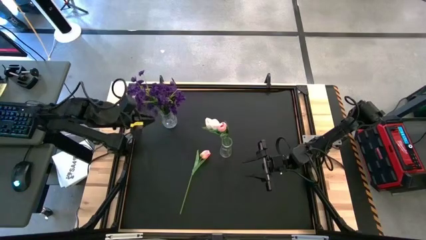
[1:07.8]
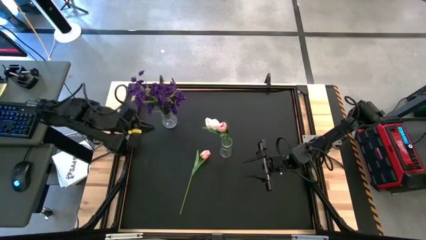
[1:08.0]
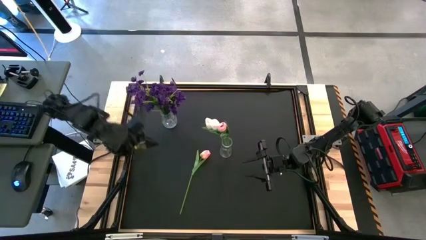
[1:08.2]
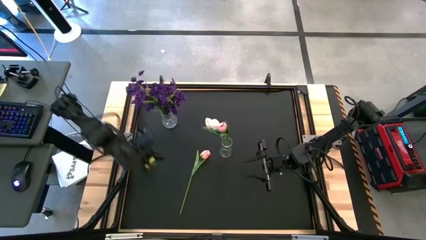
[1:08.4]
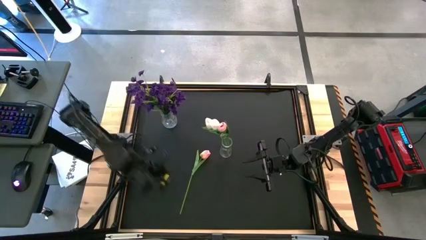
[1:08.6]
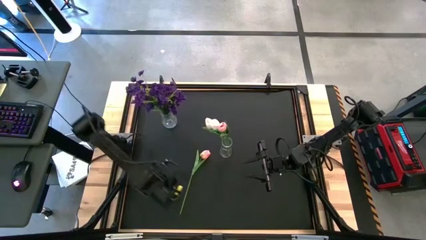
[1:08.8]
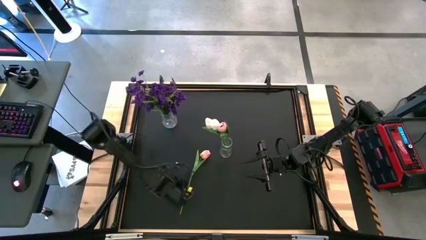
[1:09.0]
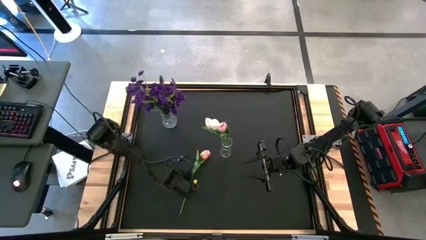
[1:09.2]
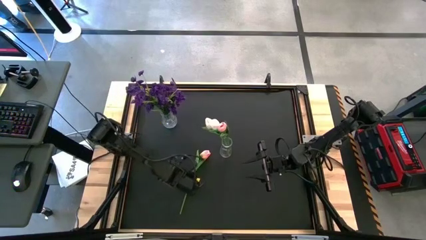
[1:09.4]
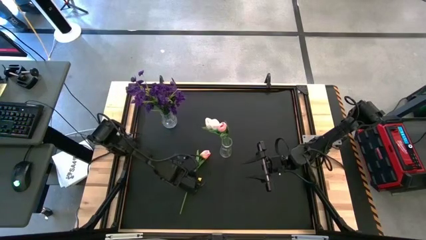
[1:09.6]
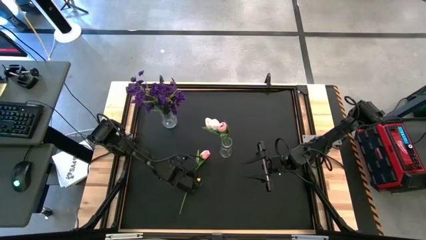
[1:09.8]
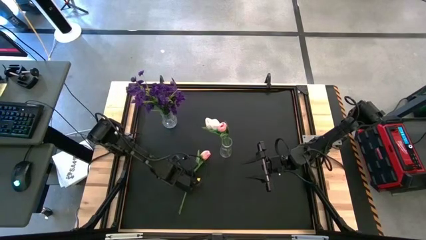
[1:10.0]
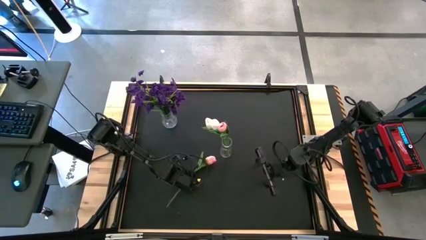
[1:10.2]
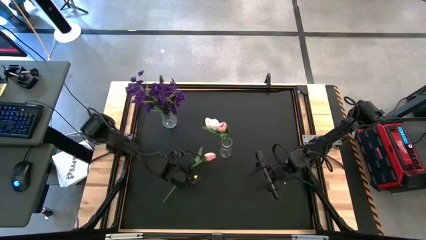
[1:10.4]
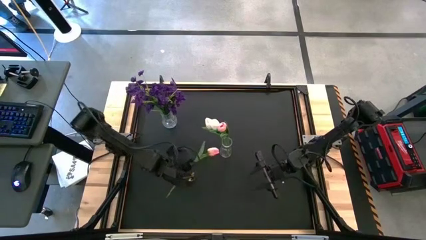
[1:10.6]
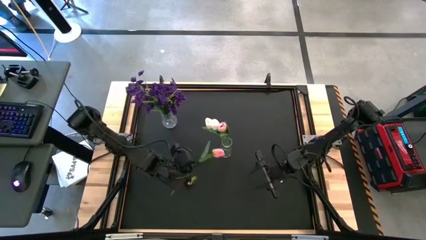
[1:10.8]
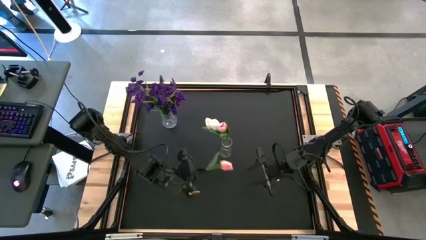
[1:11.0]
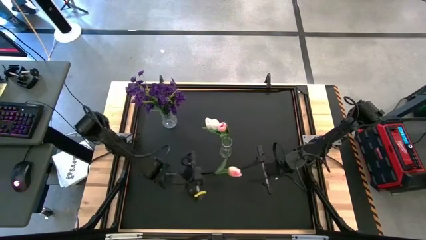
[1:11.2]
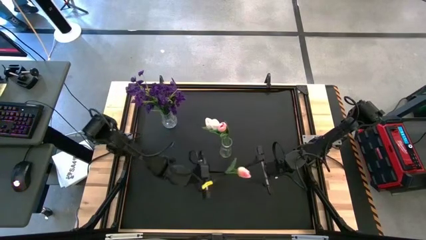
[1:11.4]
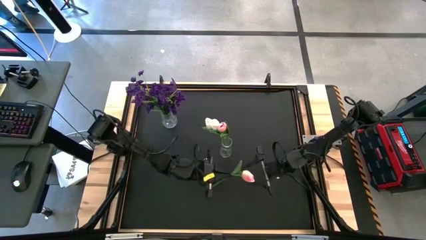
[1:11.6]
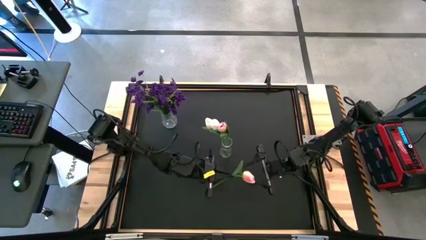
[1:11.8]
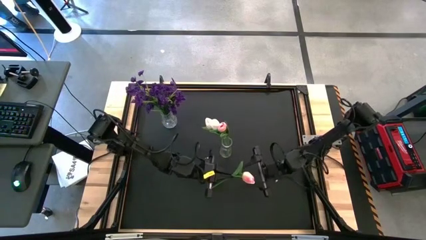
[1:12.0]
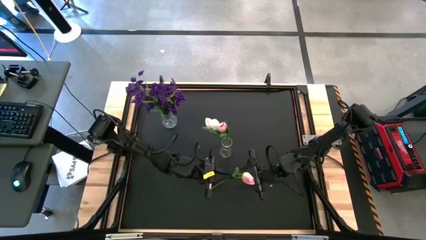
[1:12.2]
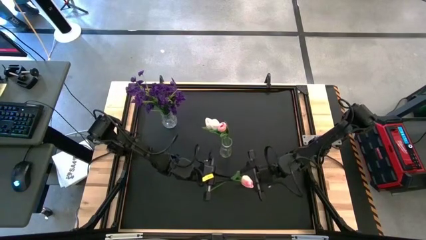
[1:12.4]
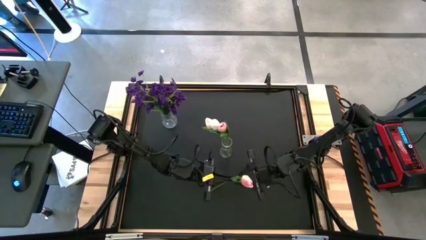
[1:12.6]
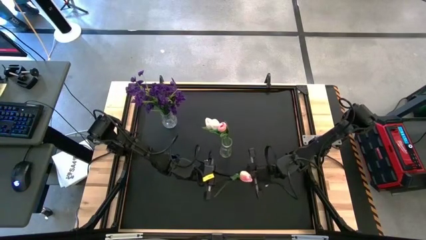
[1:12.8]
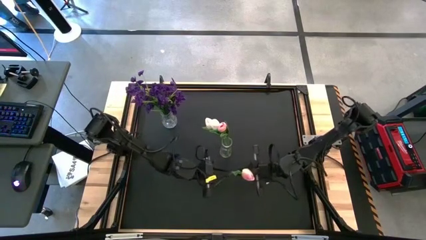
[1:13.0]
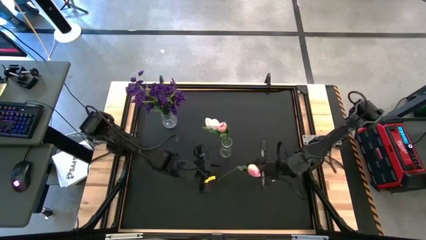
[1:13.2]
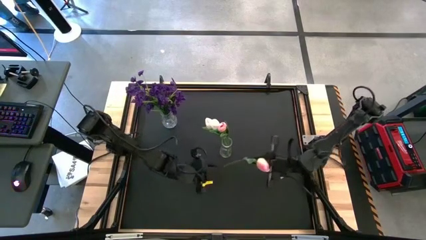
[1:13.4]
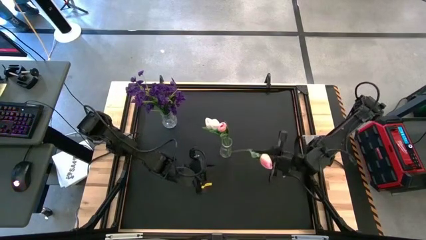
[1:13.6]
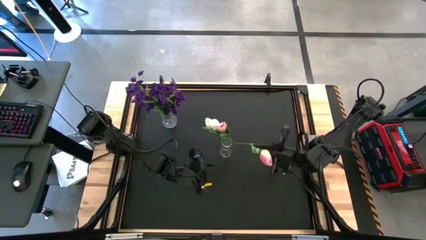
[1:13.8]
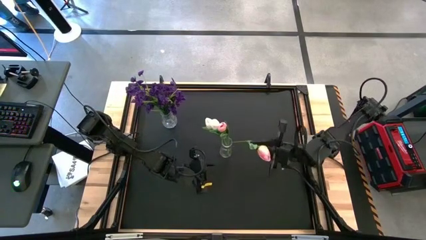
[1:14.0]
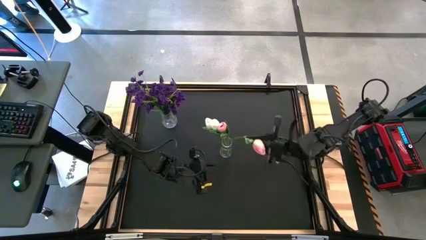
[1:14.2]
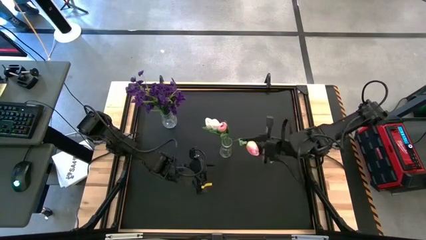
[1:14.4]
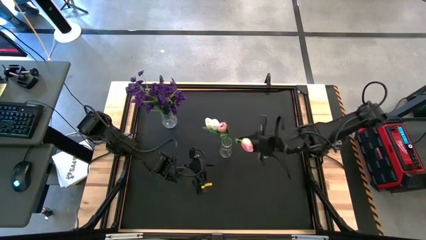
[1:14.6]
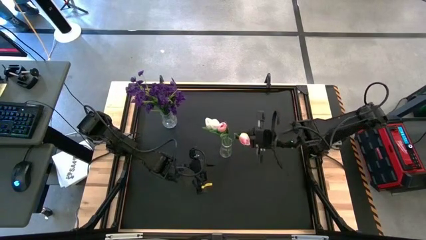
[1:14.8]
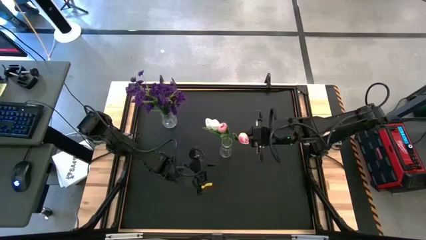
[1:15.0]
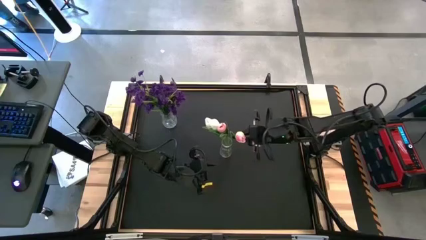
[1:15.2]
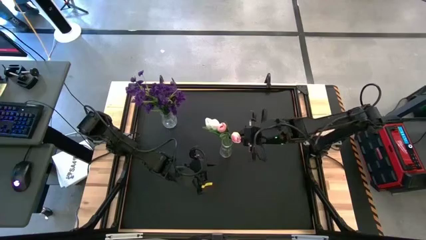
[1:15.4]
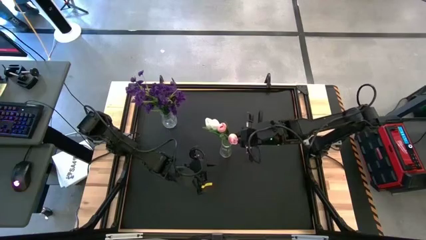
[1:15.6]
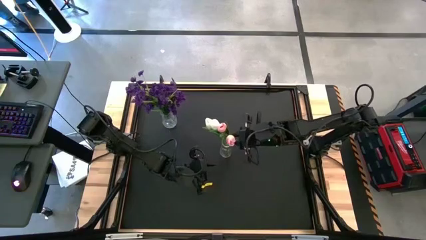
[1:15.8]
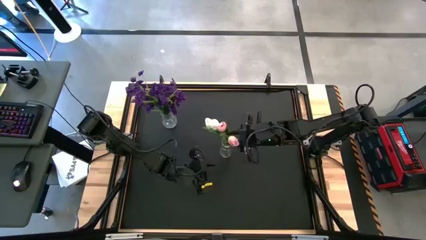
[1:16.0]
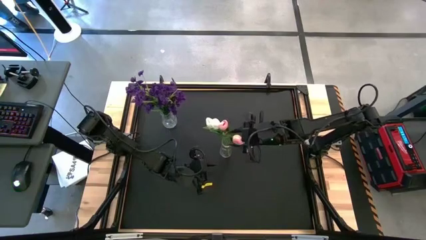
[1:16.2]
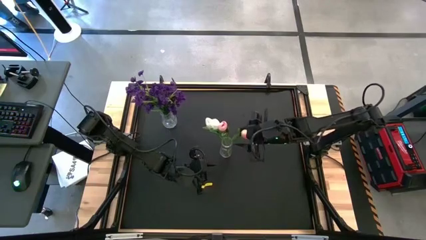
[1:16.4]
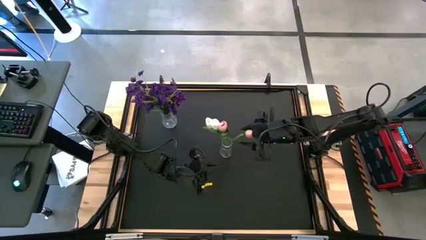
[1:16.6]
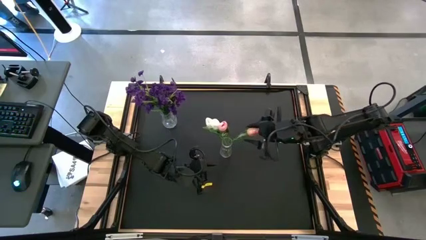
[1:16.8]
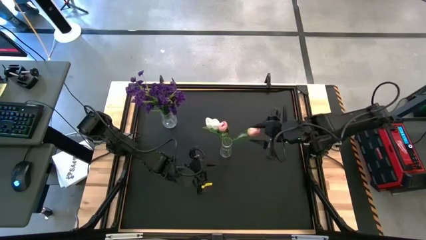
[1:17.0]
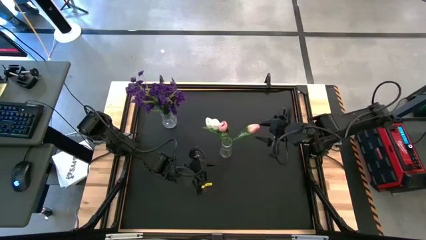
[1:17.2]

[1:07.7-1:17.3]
Task: Sort flowers into vase by color
Put the pink tulip into the right transparent flower vase

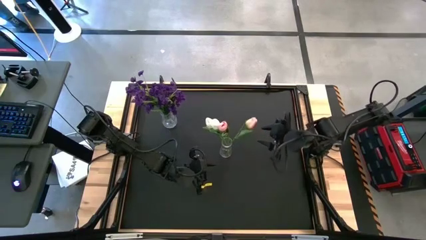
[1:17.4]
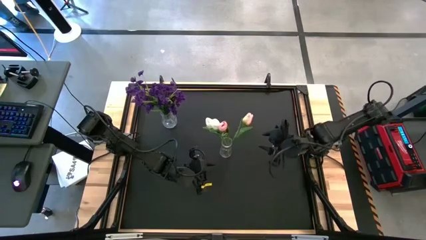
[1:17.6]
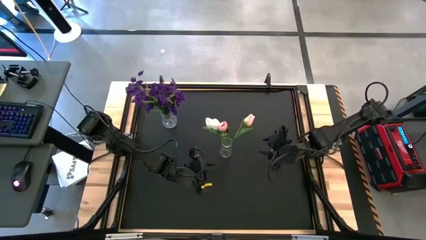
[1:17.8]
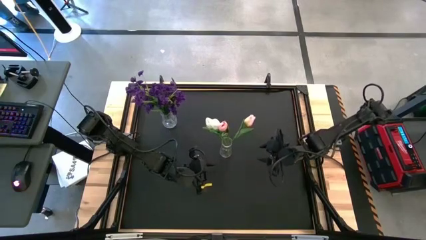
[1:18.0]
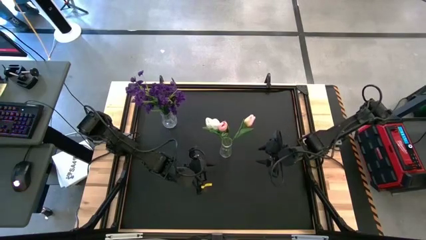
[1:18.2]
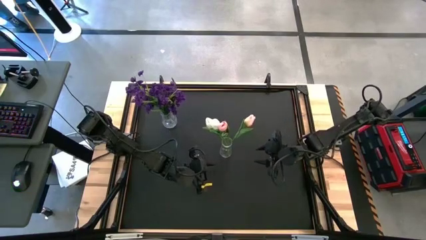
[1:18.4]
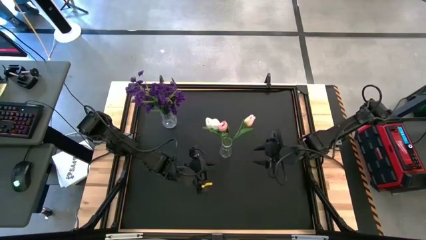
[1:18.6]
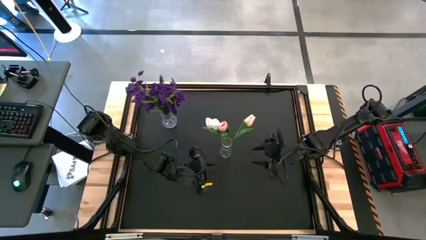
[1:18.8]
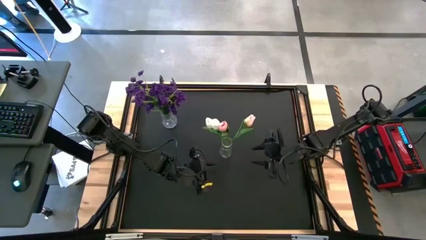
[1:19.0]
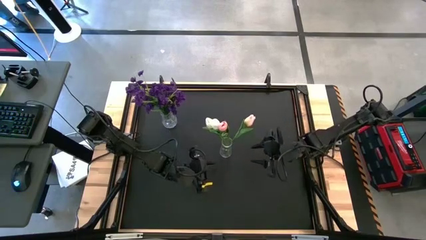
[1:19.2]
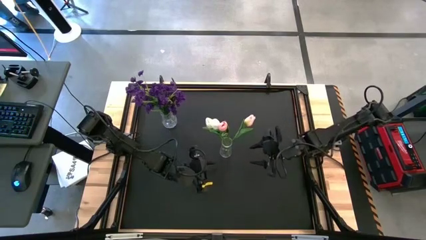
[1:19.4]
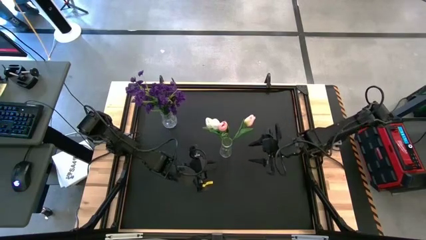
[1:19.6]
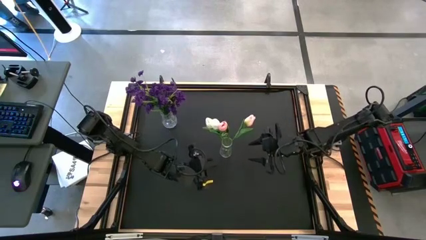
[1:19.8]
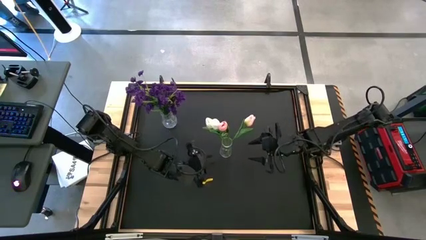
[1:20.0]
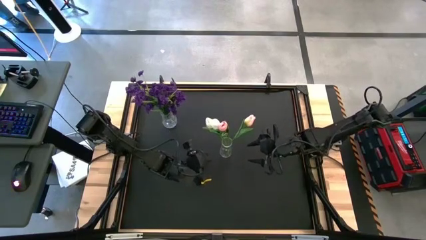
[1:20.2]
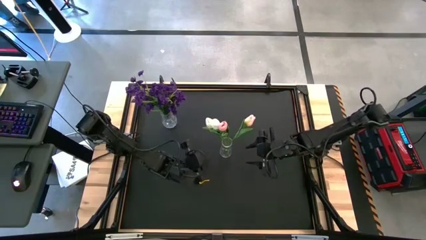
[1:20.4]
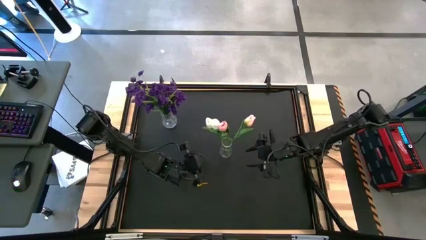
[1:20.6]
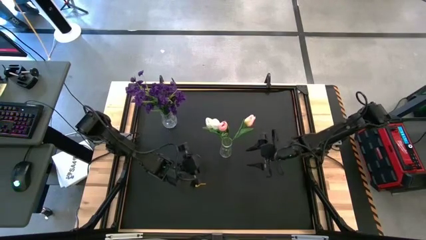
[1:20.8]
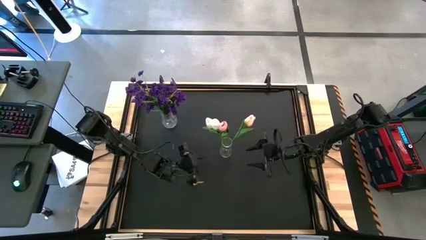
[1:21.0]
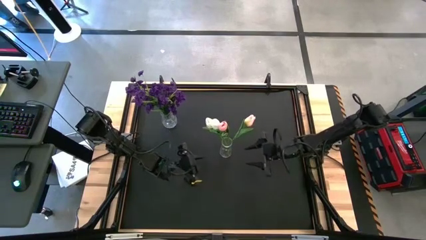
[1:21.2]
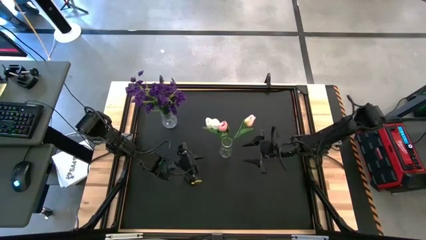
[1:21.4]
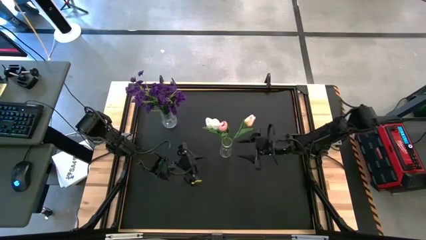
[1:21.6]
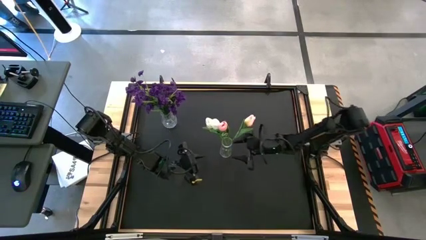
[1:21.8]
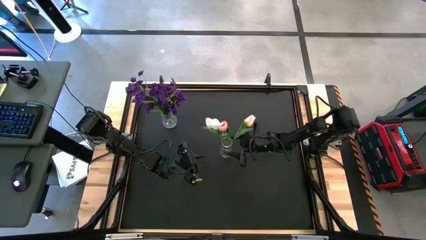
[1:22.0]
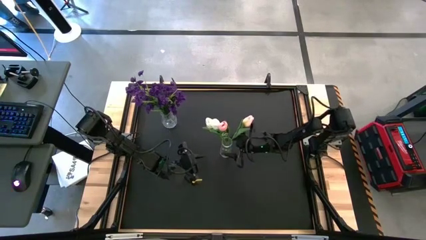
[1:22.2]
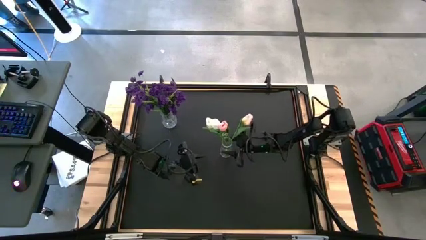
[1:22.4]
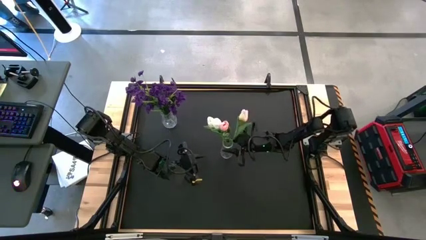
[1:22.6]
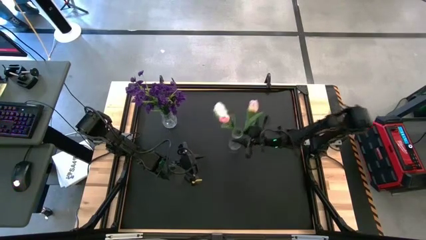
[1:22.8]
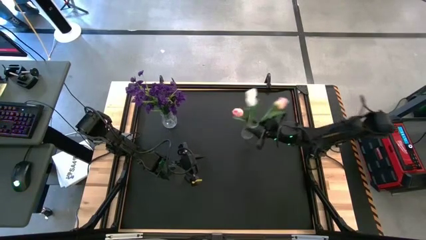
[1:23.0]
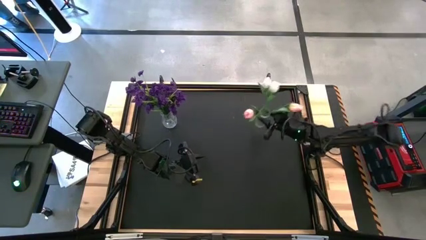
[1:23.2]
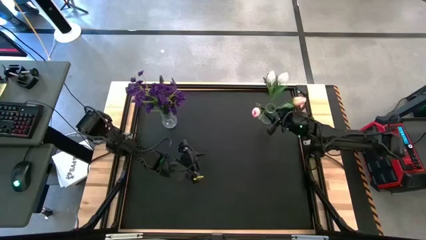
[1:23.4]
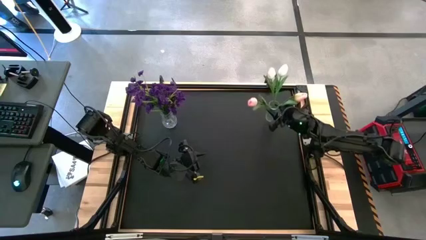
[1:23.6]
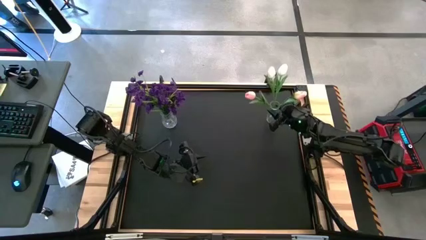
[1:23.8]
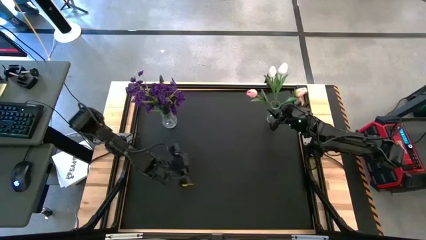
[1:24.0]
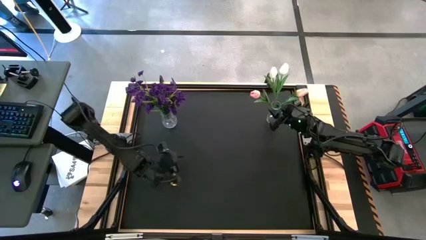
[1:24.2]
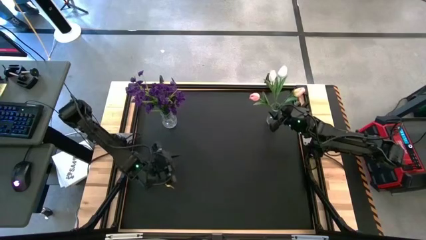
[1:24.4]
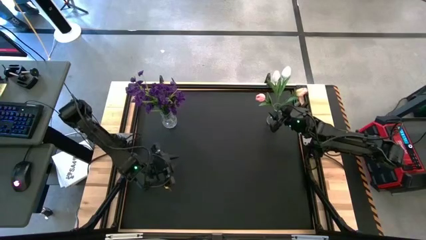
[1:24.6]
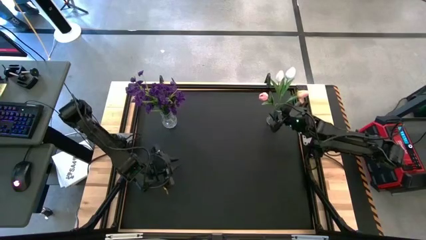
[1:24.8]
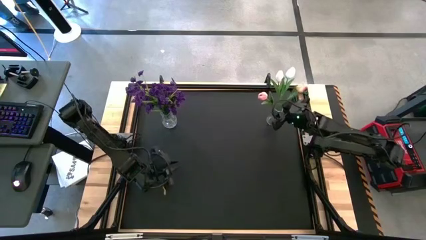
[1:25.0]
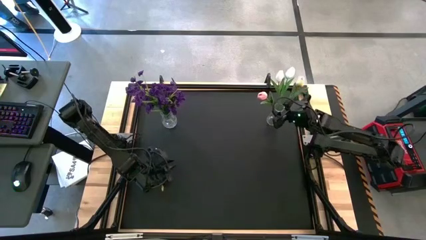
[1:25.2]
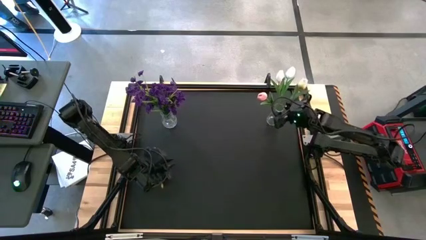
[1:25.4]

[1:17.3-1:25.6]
Move the right transparent flower vase to the top right
